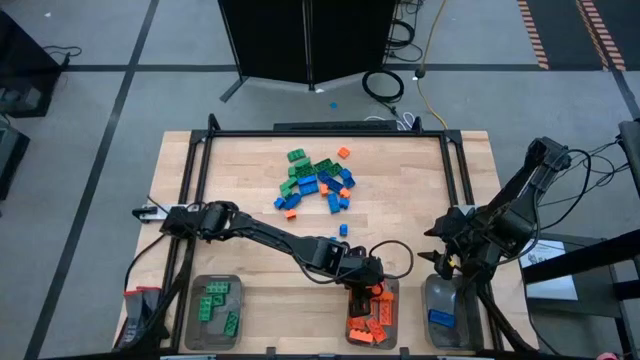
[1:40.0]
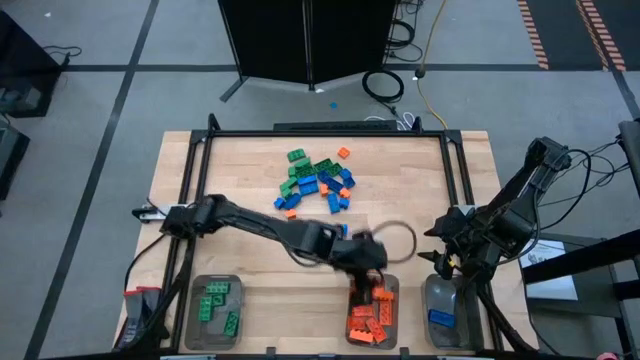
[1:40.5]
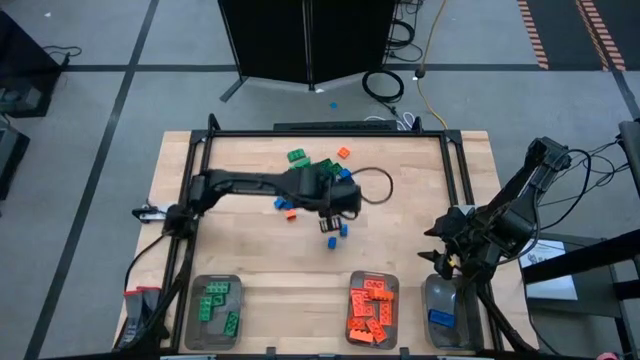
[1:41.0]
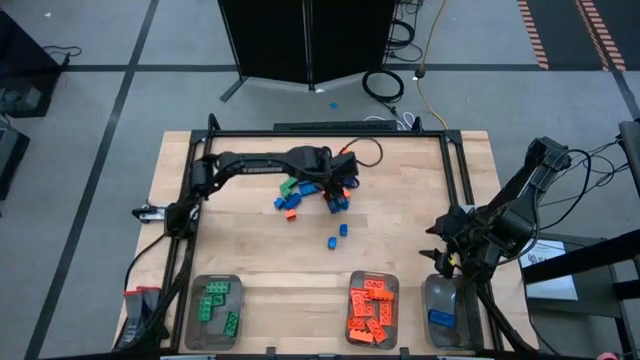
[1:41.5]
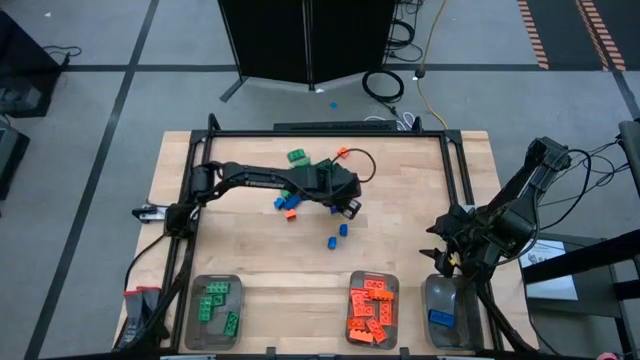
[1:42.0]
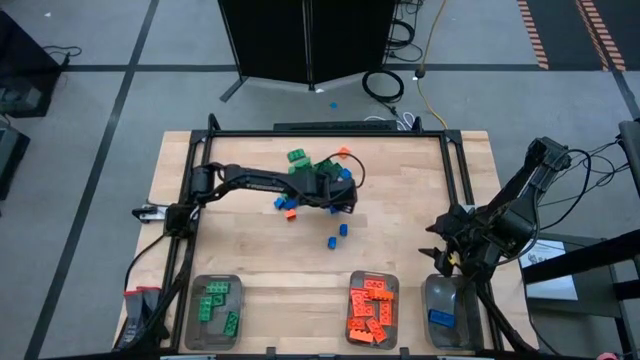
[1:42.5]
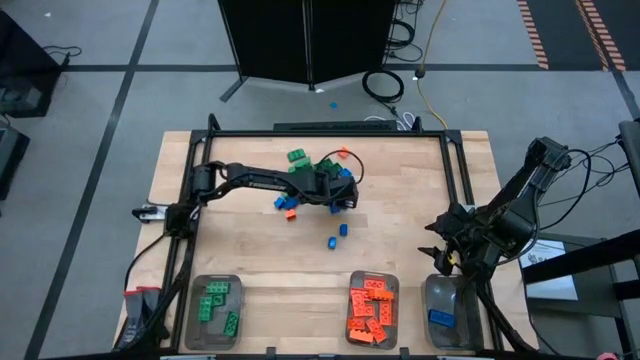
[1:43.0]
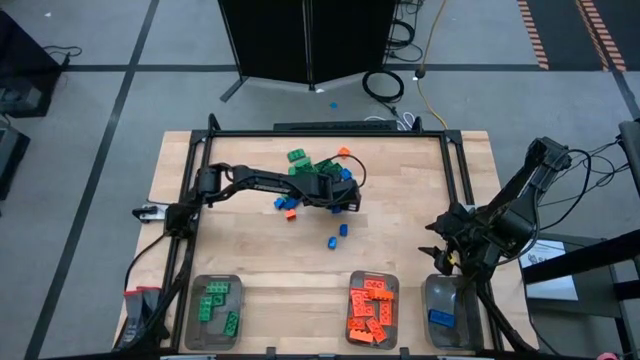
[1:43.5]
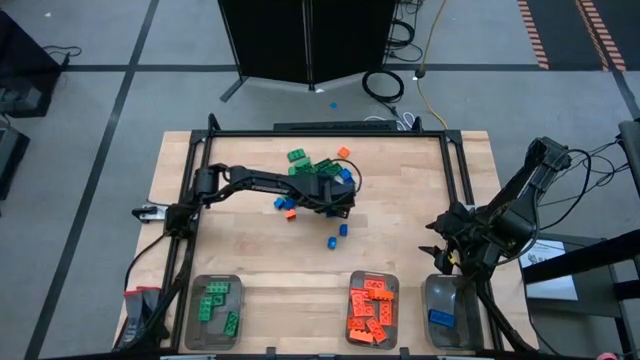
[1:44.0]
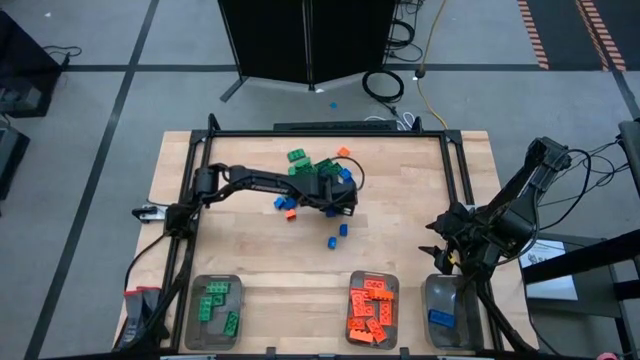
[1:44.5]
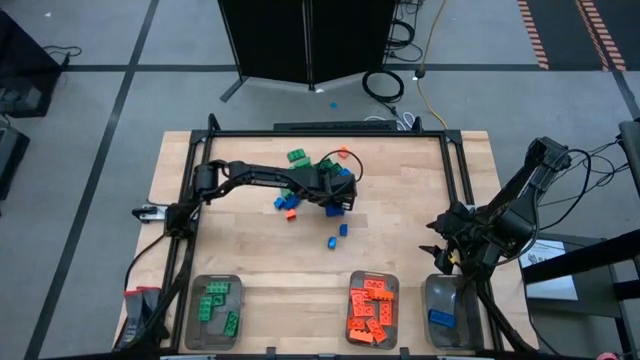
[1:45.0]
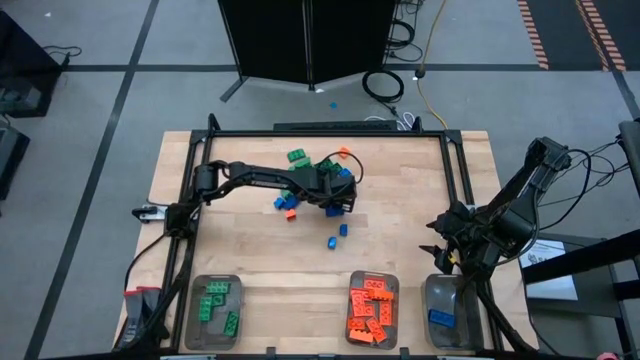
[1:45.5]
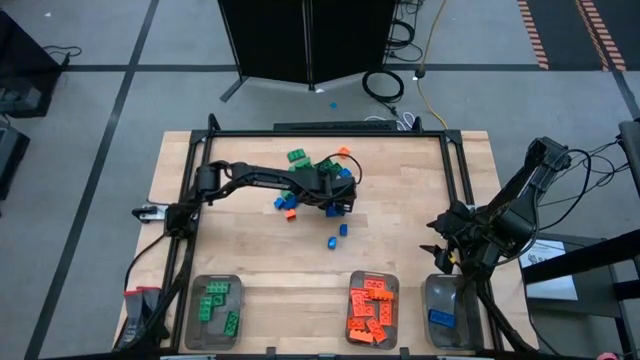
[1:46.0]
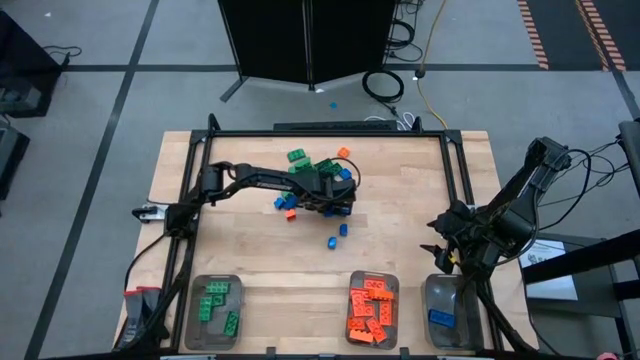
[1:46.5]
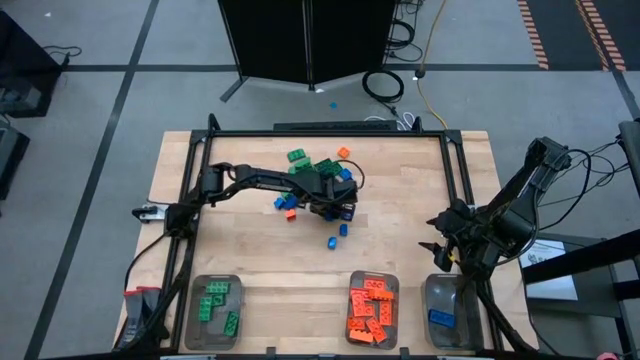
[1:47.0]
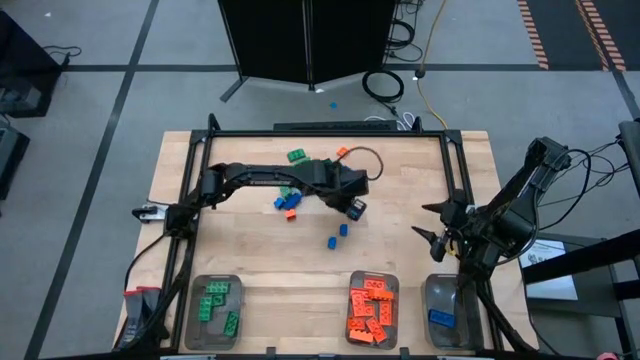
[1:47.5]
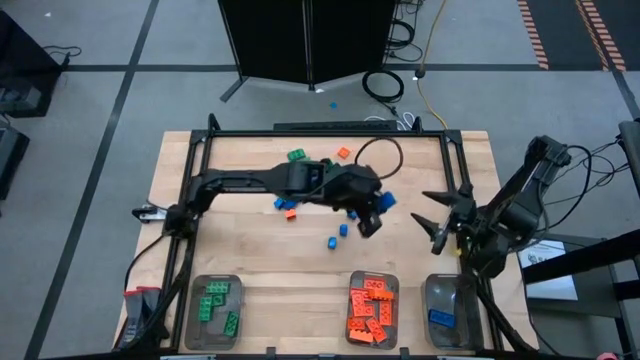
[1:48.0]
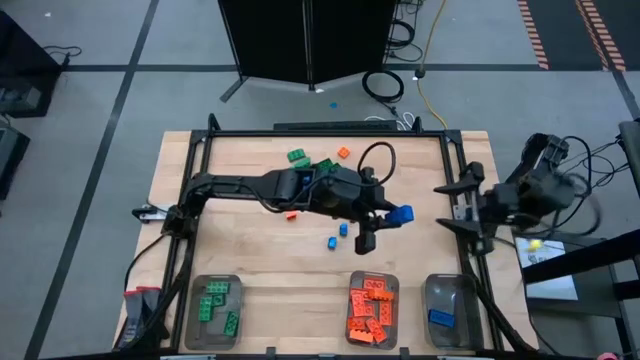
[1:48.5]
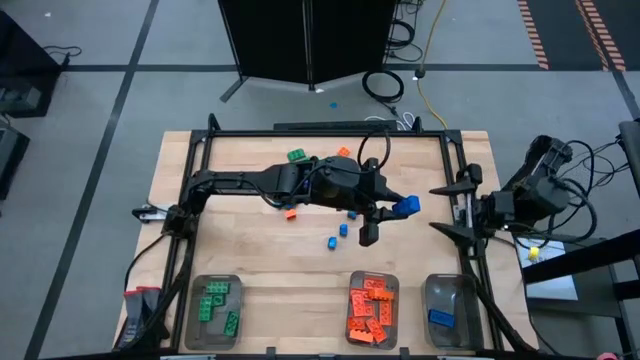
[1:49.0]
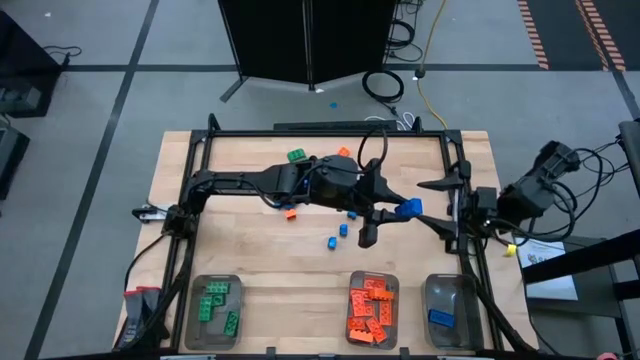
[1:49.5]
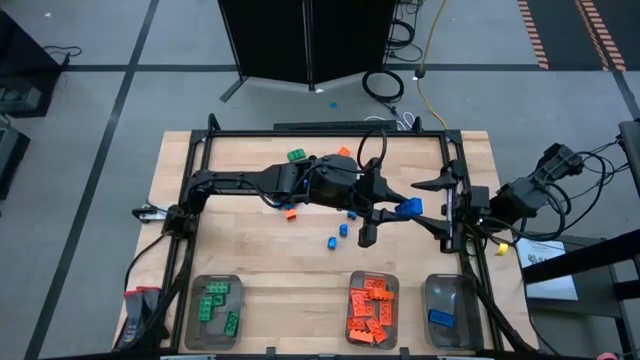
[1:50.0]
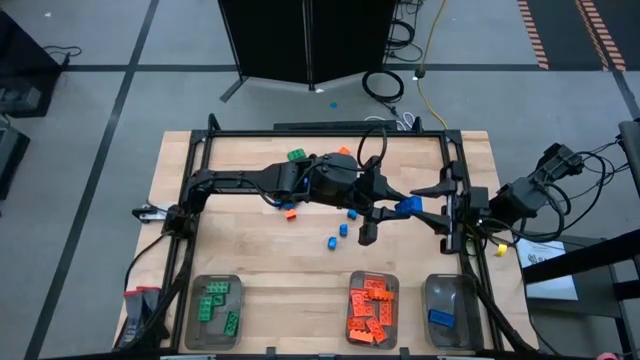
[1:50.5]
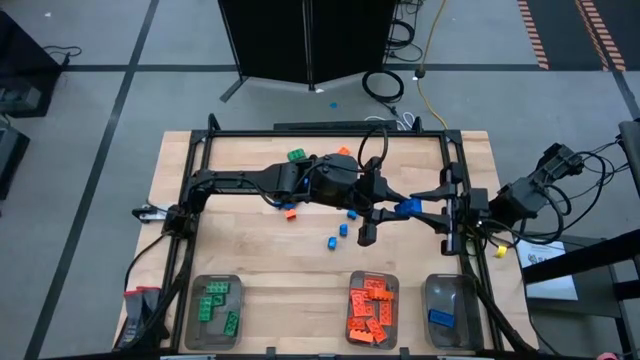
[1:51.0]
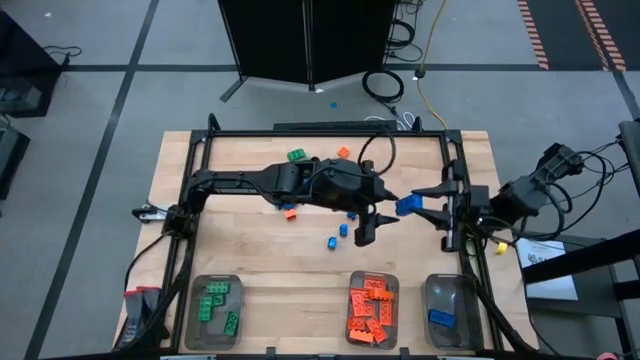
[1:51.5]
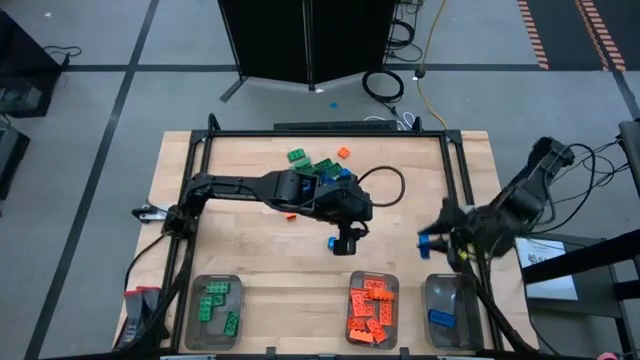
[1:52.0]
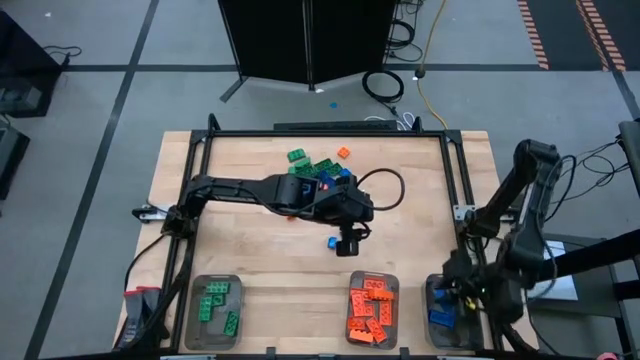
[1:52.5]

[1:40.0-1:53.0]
Task: Sort blocks
Put the blue game piece into the right black bin

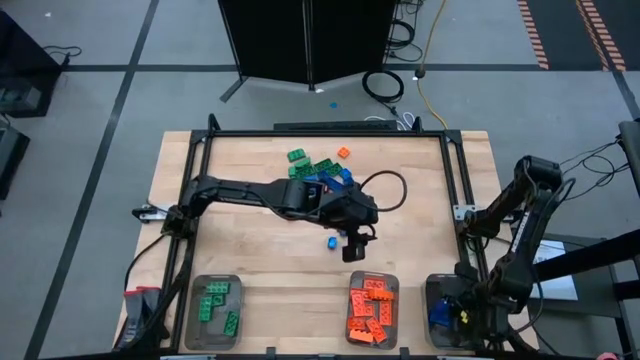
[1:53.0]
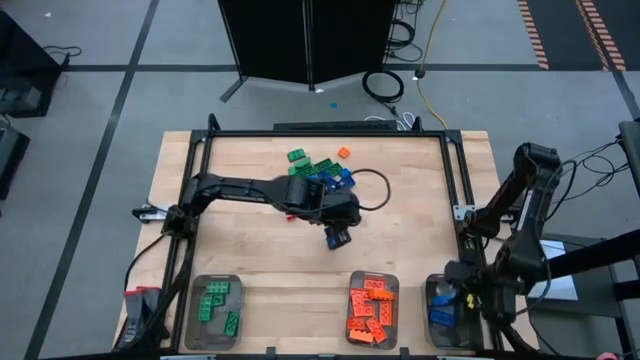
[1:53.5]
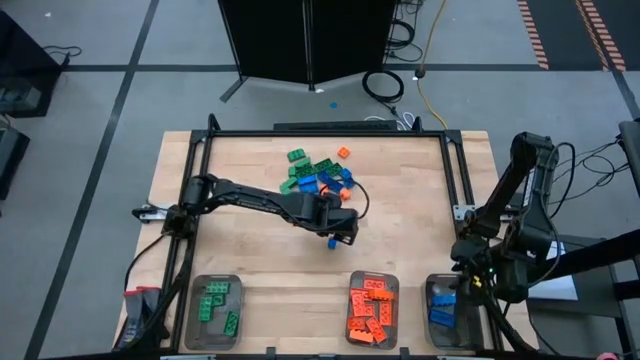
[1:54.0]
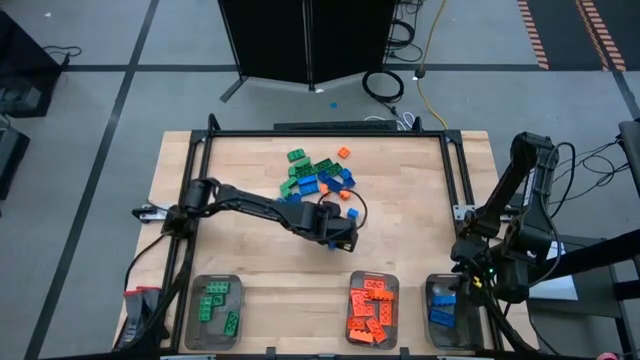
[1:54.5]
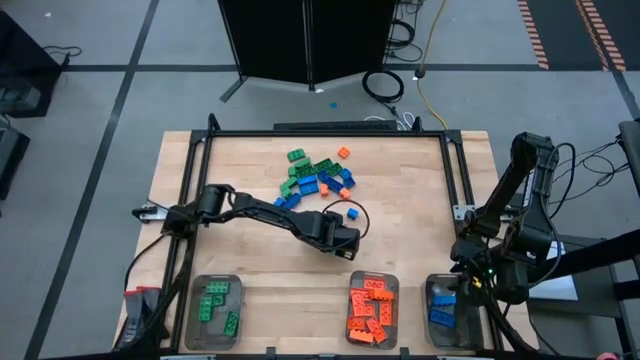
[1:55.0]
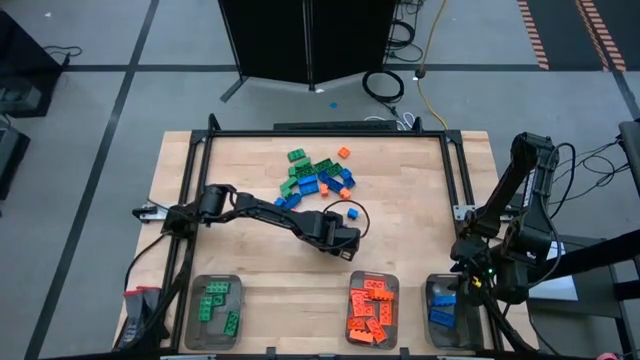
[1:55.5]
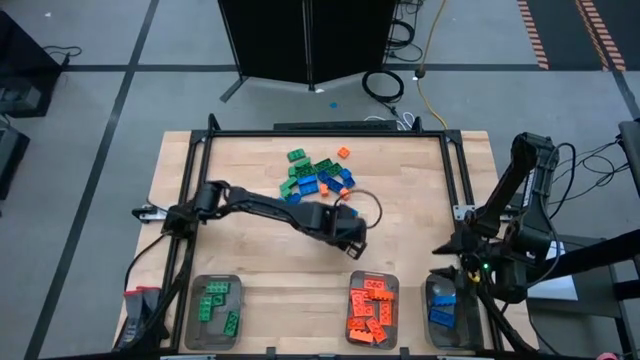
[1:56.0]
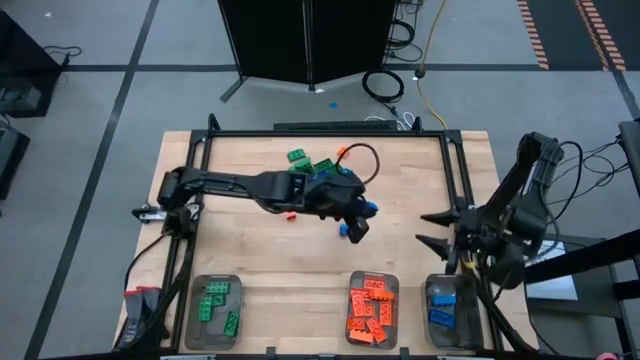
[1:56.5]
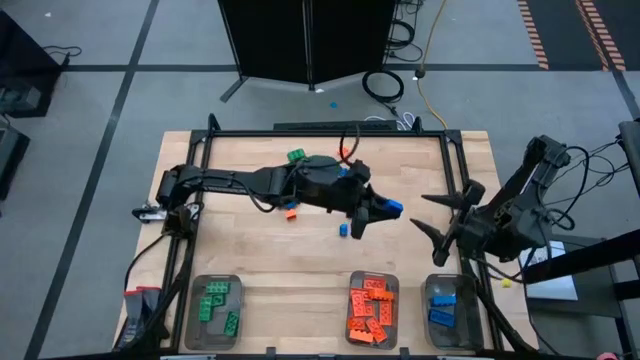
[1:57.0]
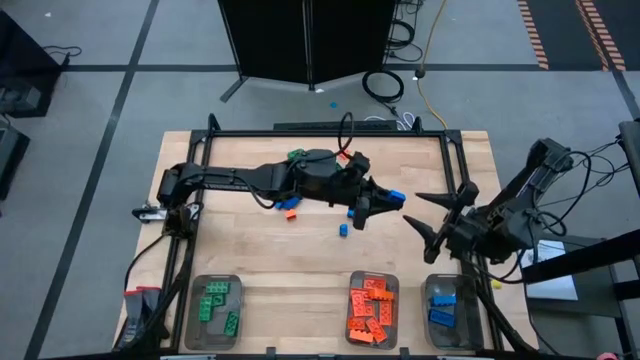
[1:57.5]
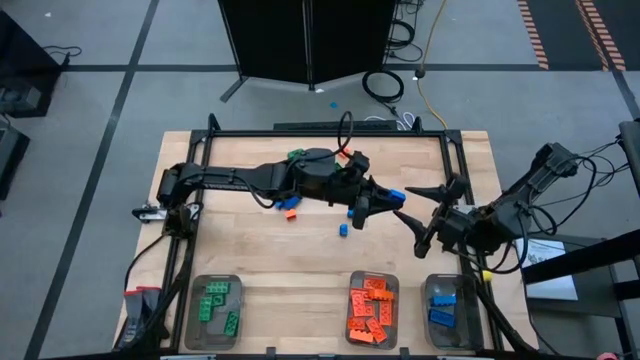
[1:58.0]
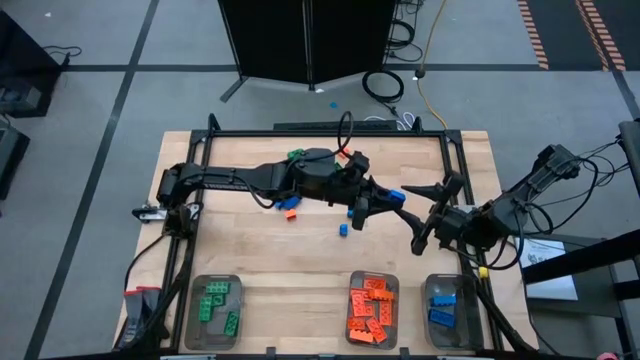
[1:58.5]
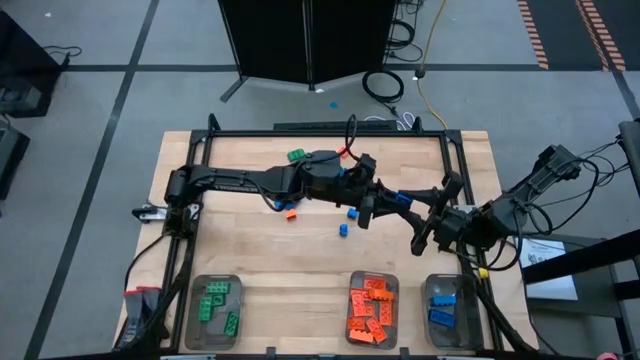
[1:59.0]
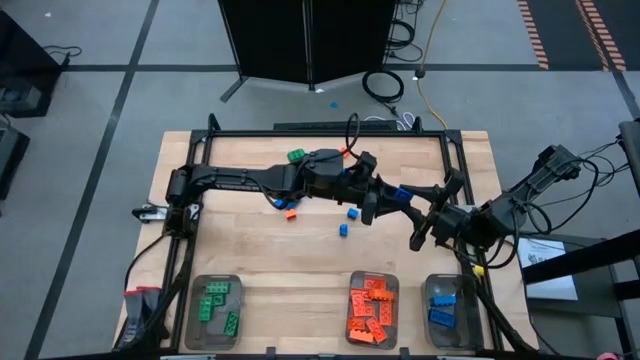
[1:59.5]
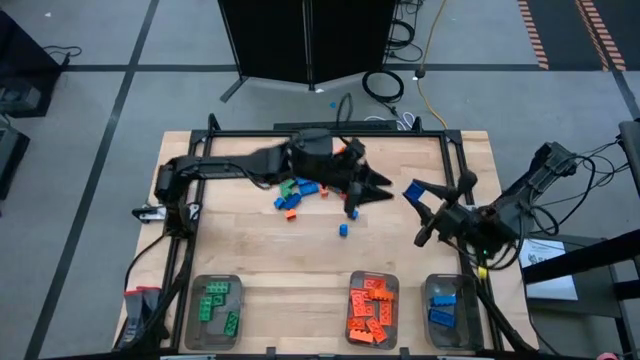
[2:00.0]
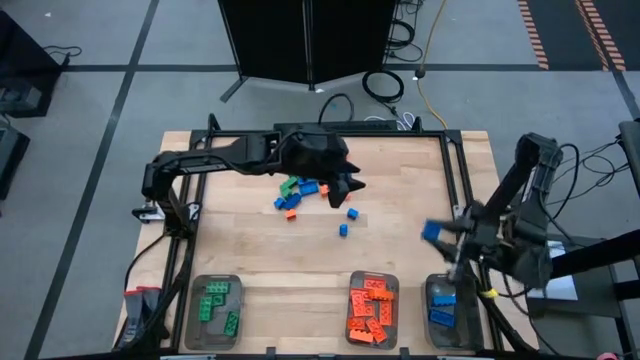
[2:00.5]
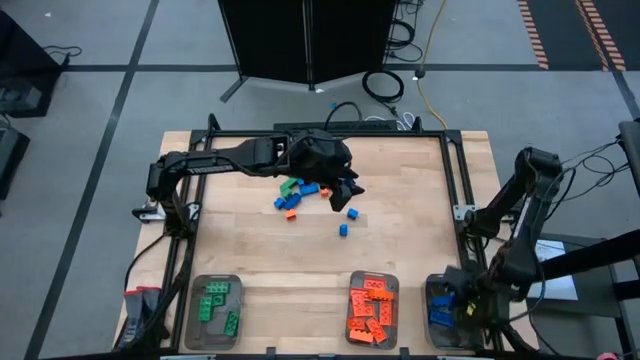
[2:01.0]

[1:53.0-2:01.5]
Put the blue game piece into the right black bin
